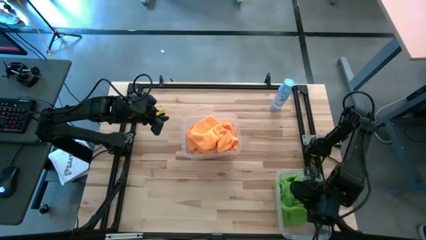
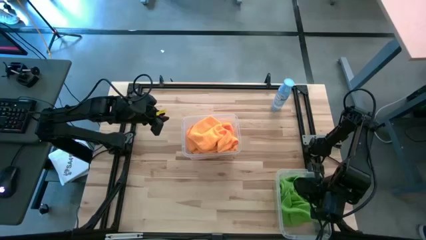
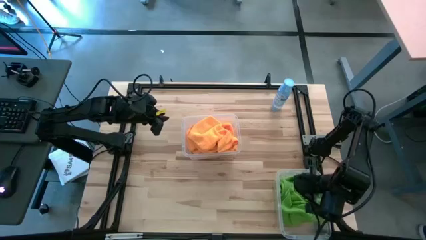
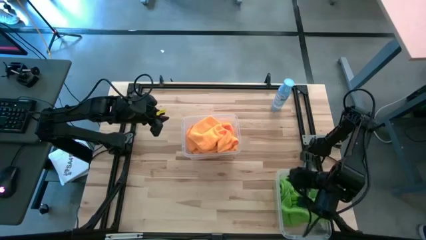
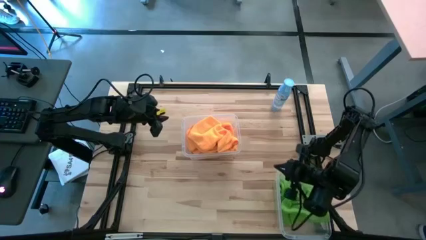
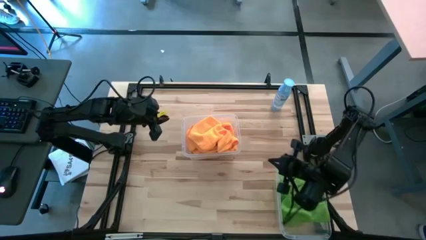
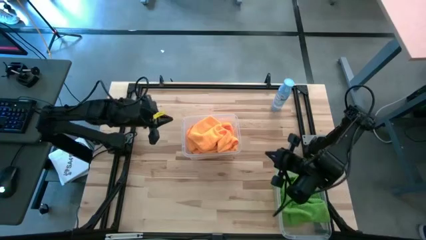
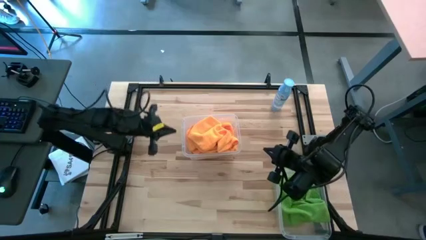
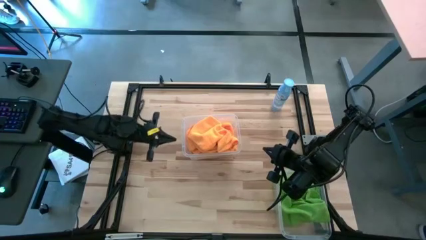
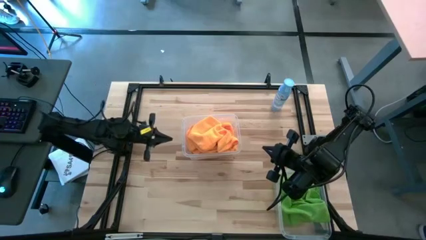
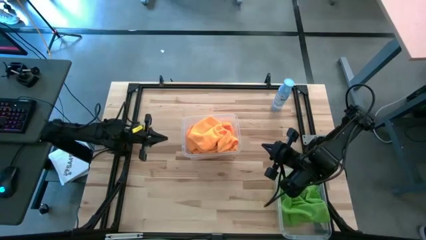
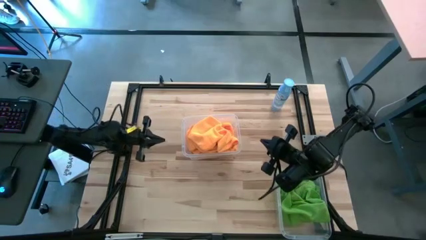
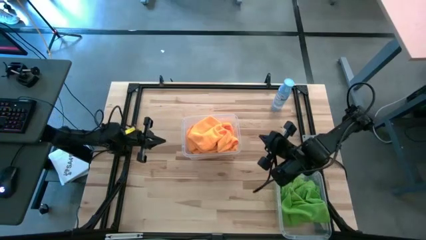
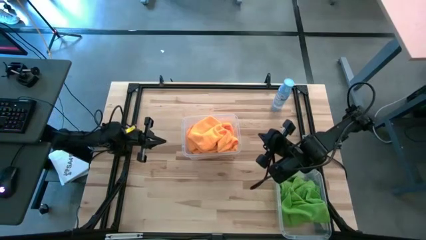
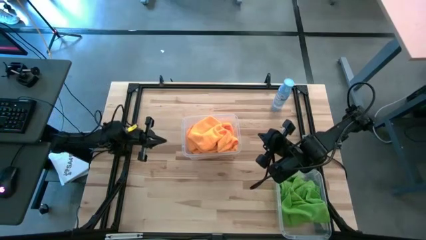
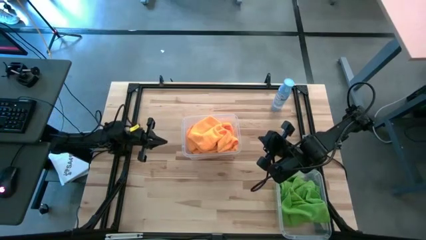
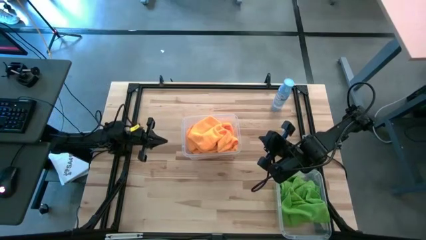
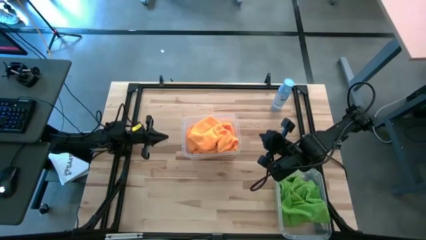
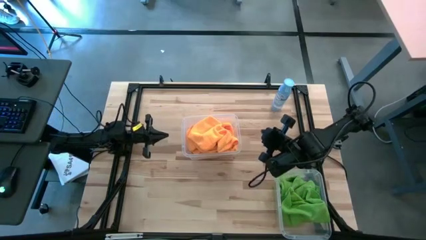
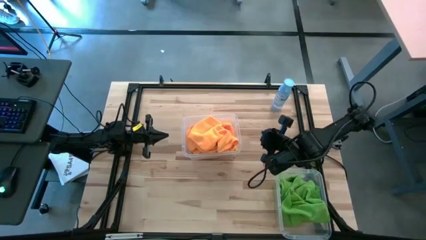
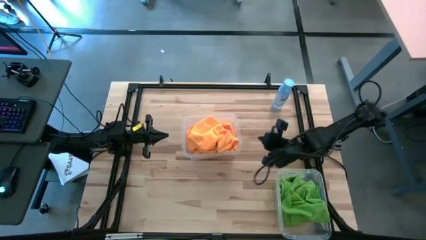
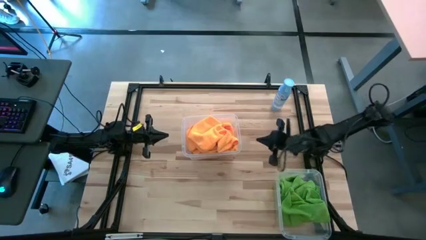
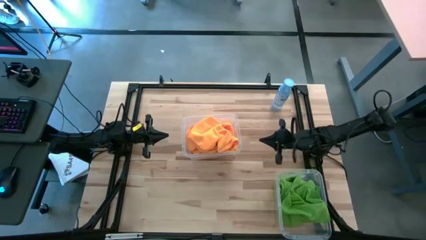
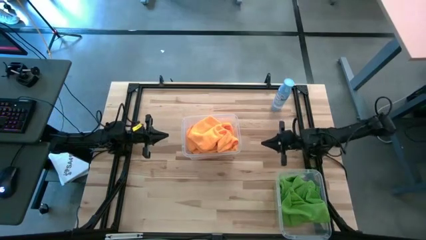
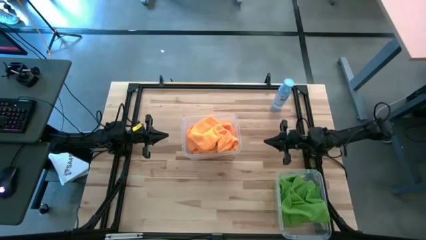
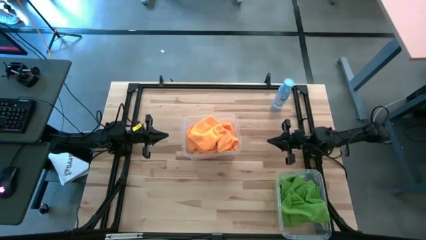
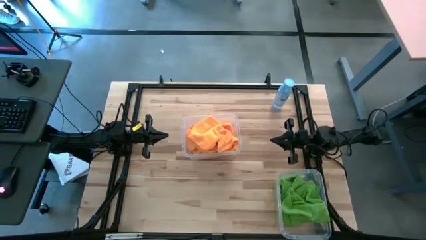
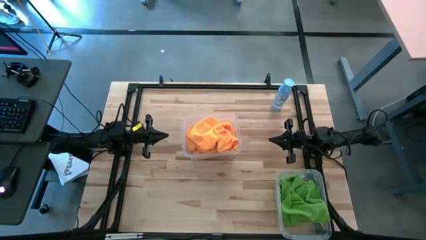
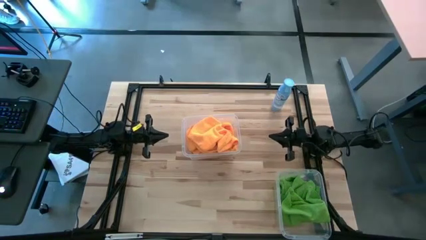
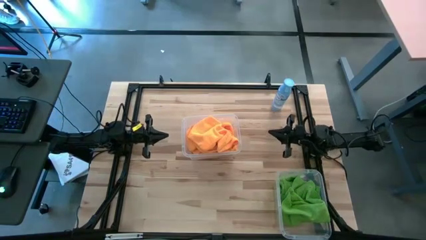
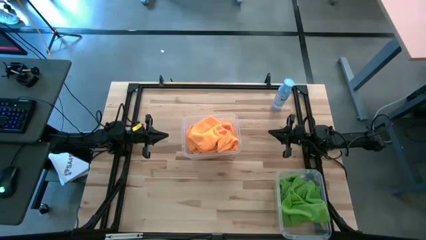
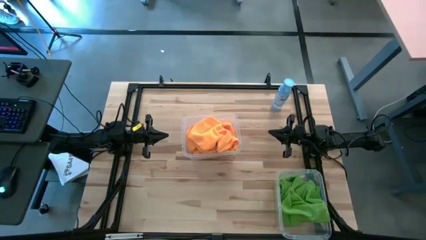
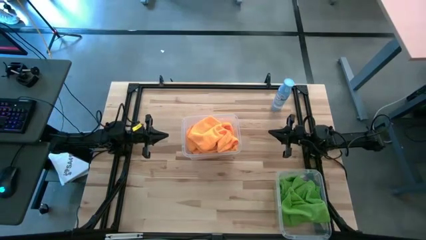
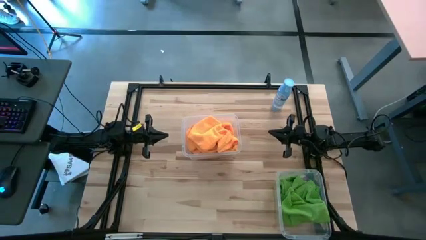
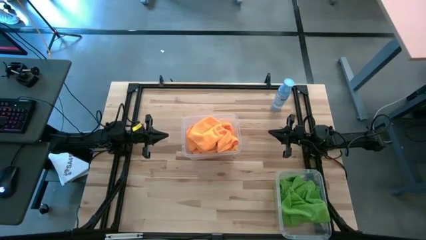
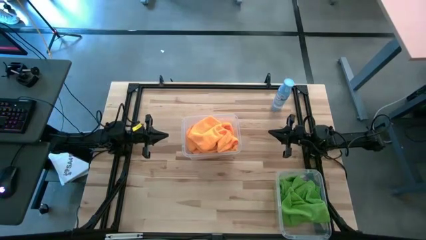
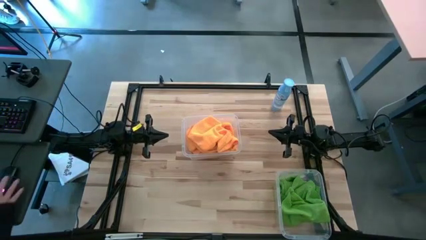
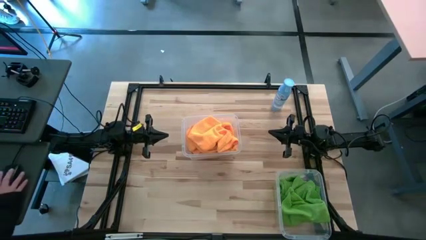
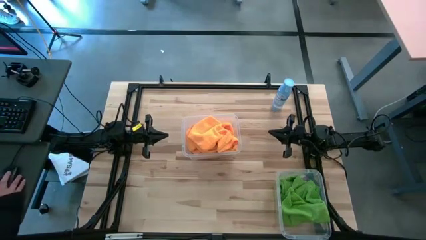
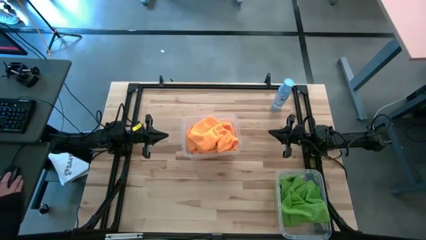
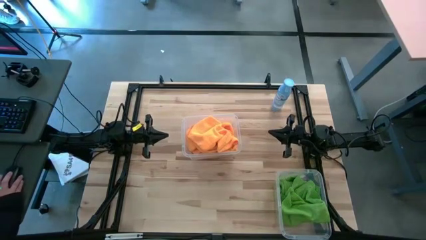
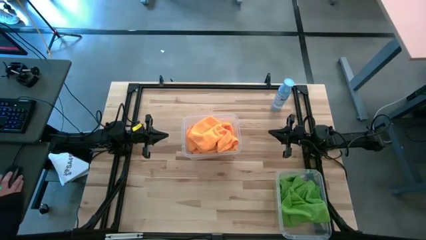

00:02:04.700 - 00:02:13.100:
Task: Sort microfiber towel by color & place in baskets
Return to Home Position

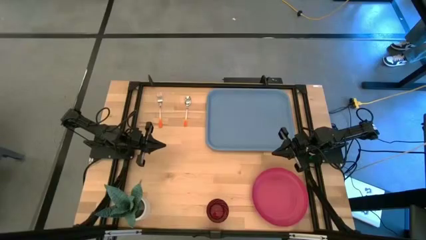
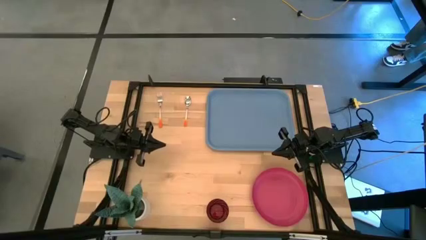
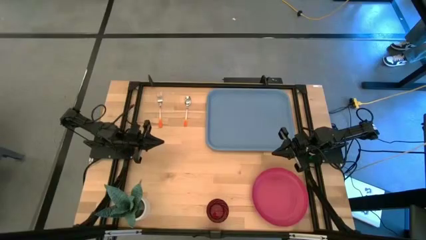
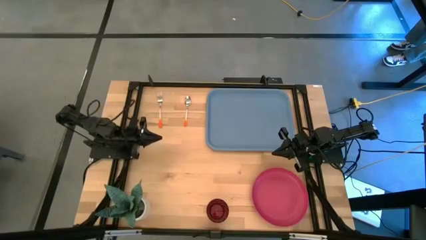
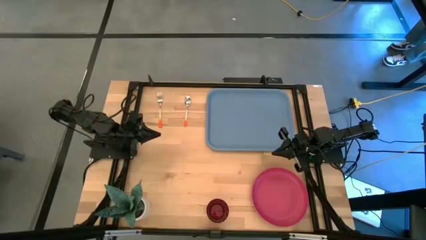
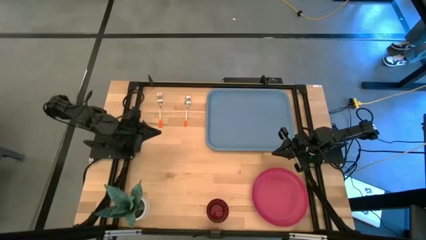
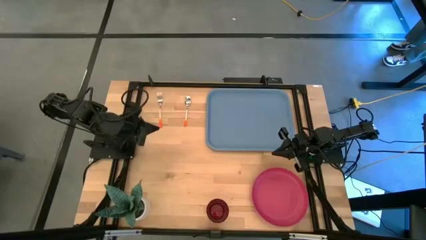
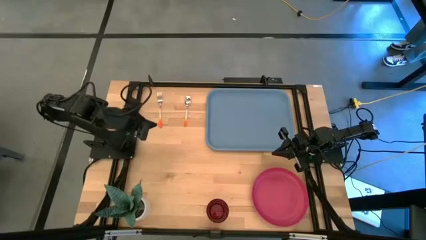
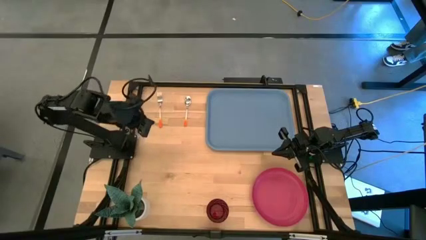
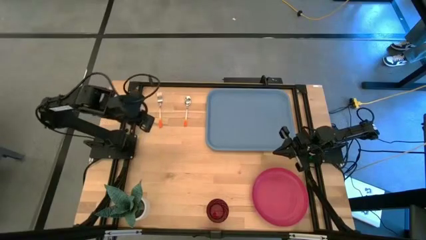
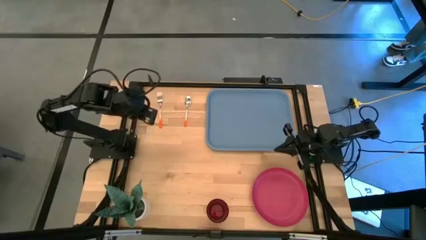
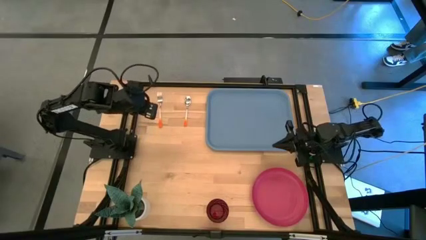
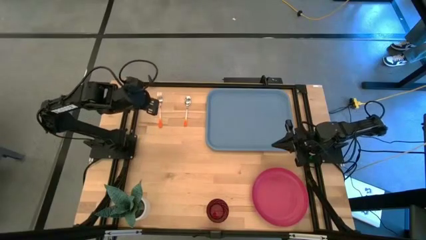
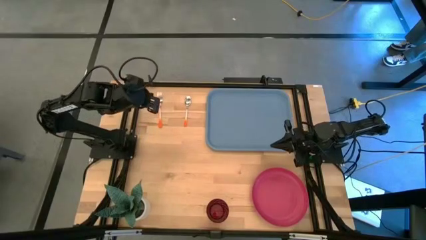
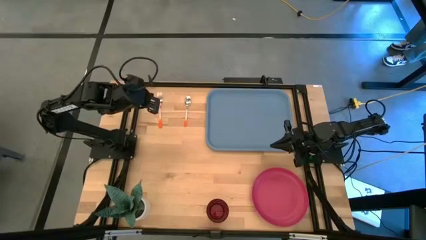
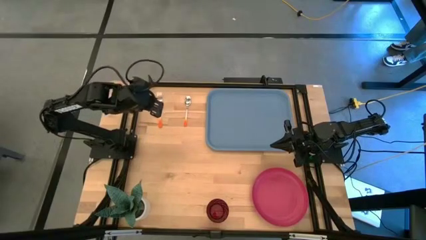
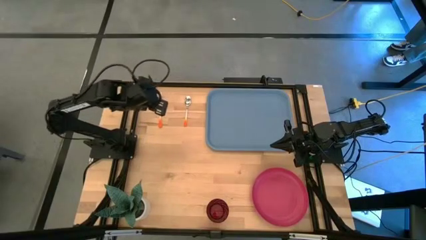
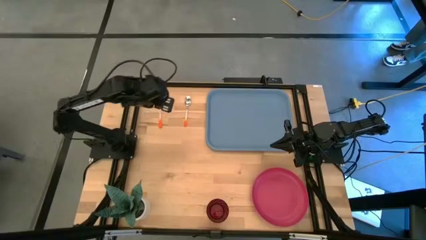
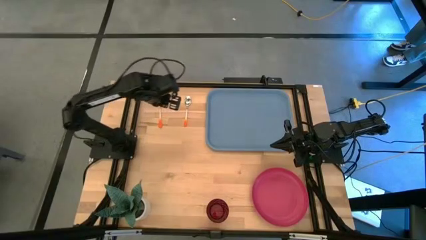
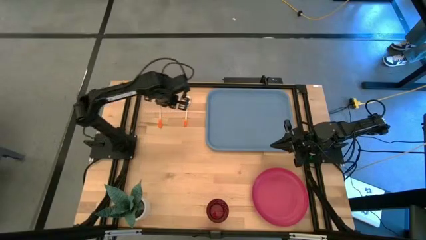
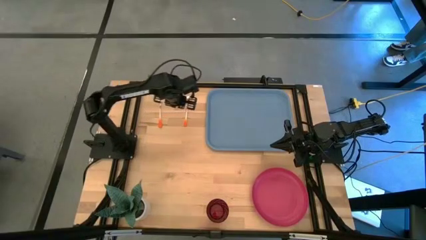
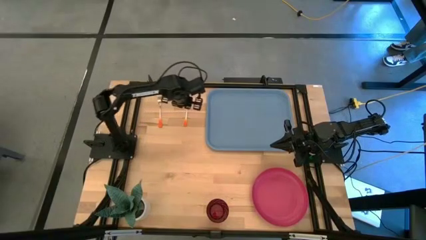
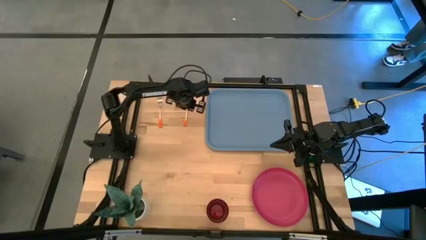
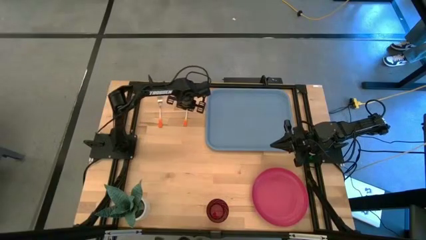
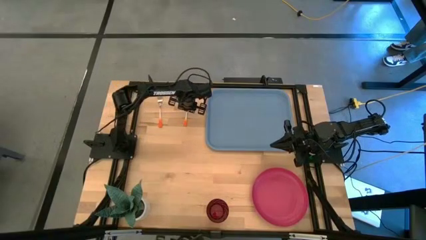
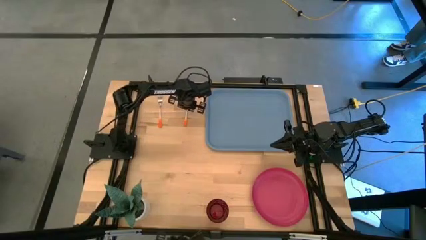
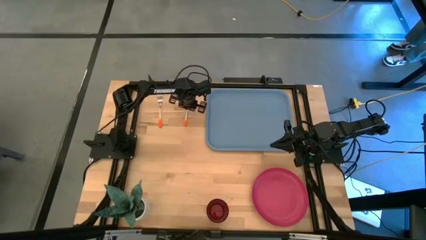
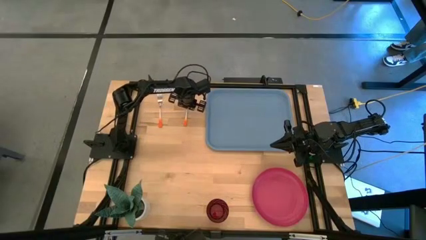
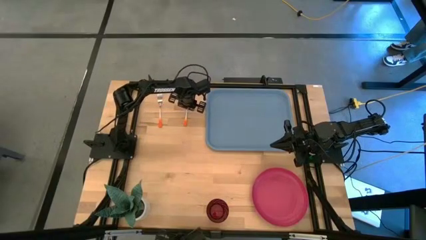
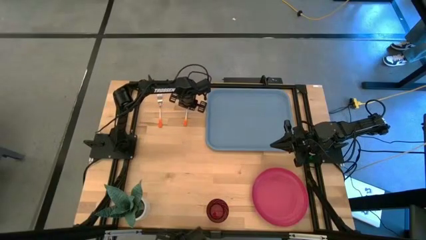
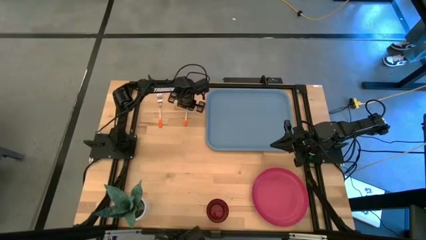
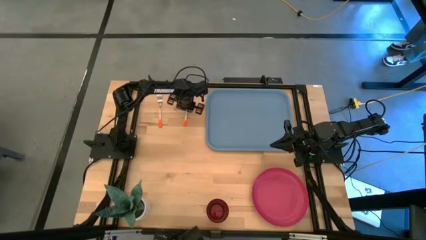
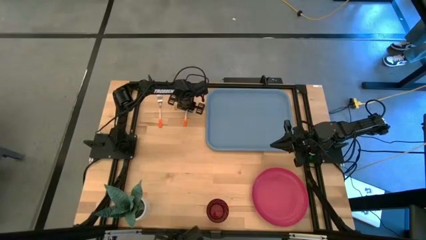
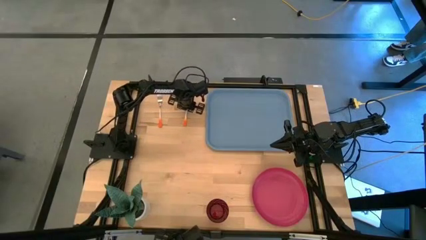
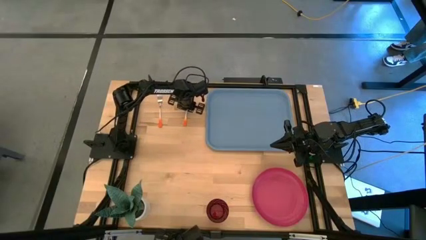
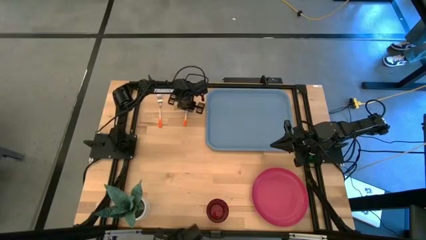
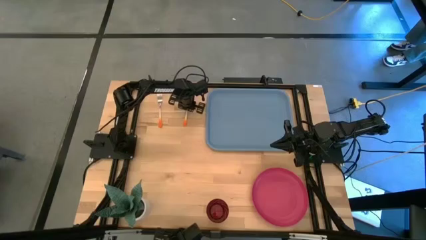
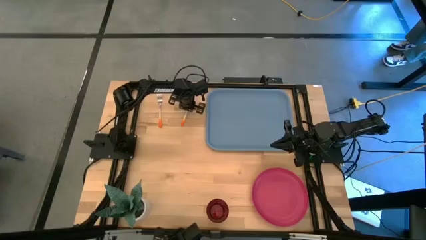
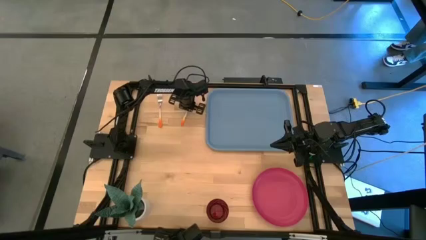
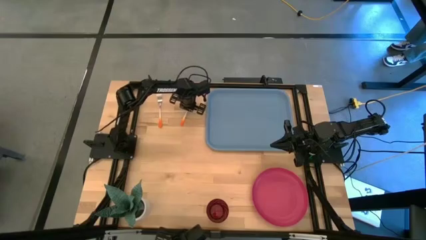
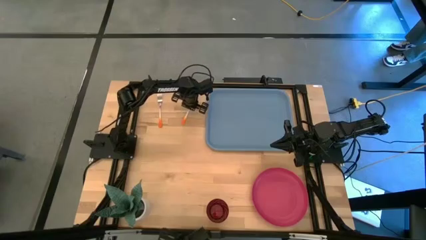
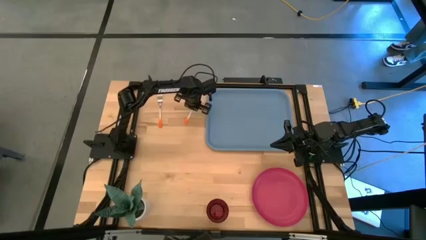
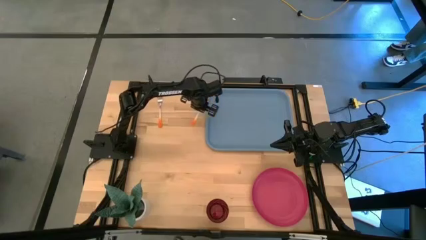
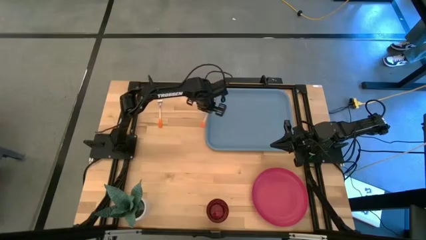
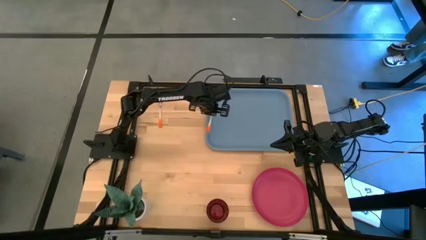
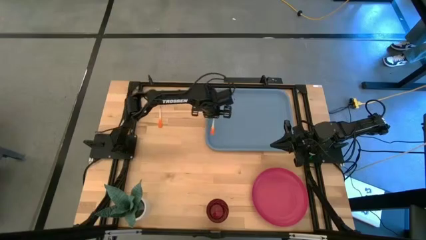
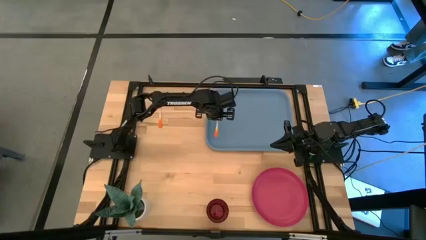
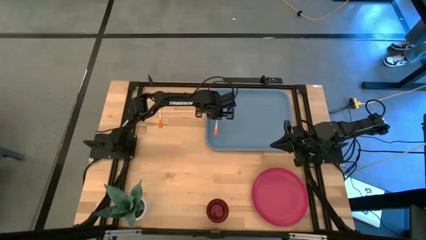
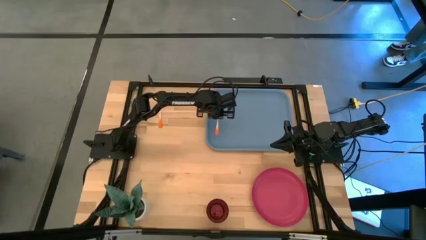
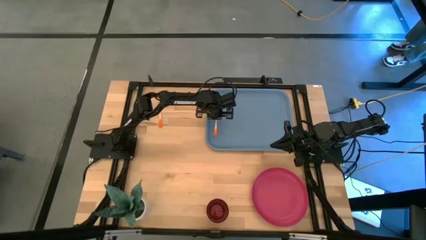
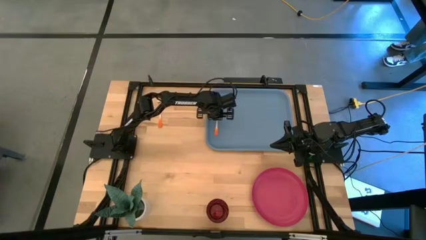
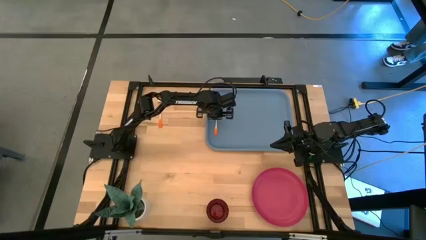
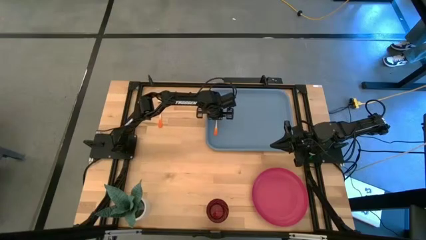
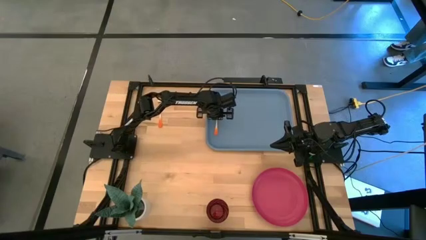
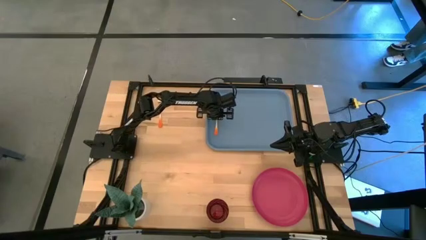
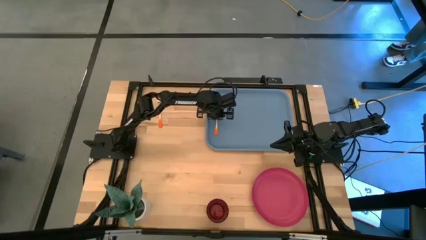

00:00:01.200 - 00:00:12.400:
Task: Pick and place plate/cup/fork/spoon on tray
Put the orange spoon on the blue tray
